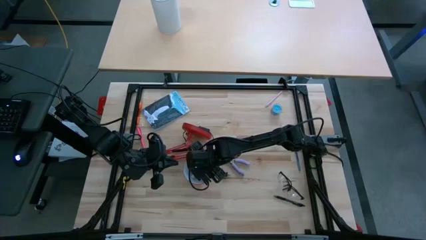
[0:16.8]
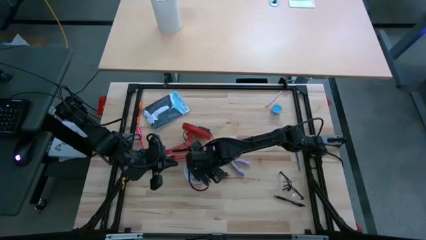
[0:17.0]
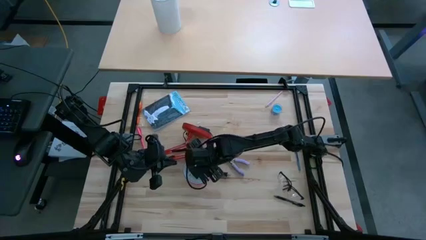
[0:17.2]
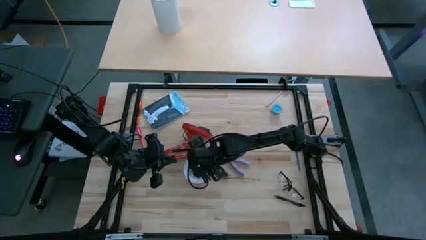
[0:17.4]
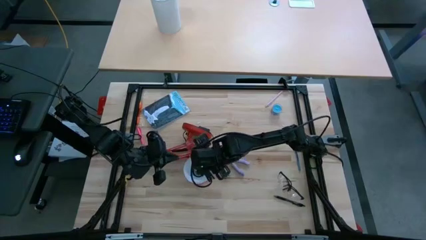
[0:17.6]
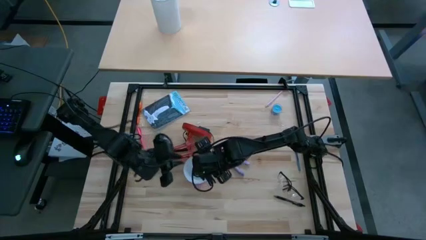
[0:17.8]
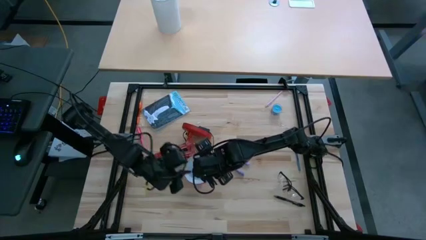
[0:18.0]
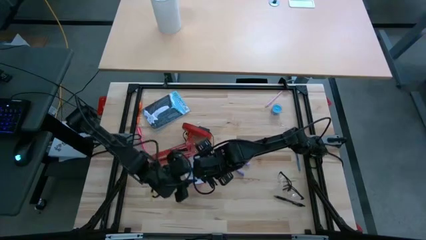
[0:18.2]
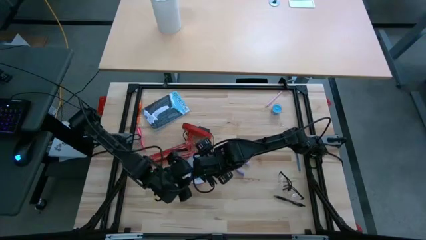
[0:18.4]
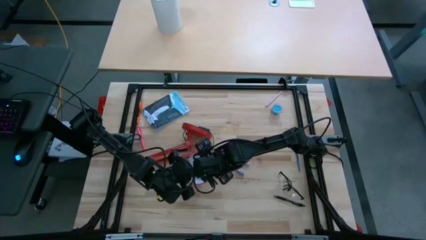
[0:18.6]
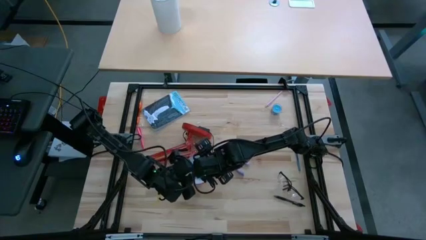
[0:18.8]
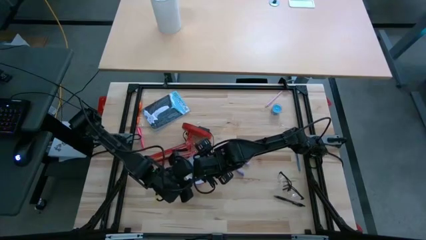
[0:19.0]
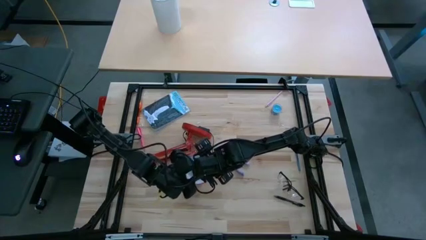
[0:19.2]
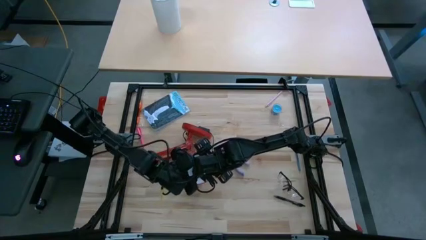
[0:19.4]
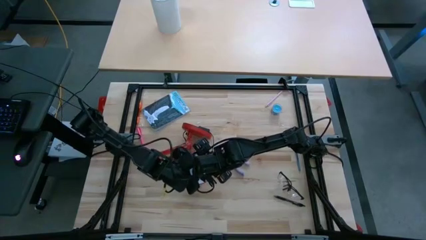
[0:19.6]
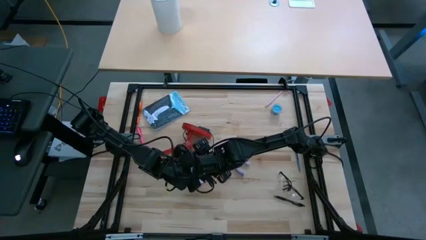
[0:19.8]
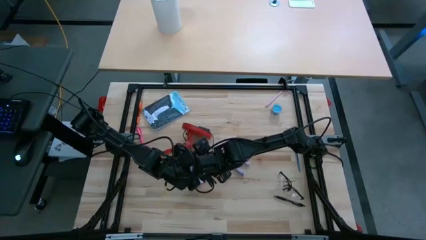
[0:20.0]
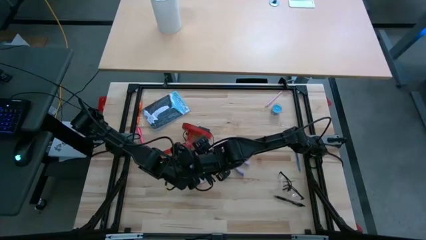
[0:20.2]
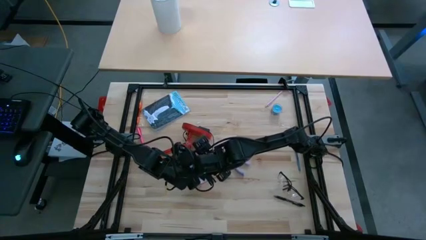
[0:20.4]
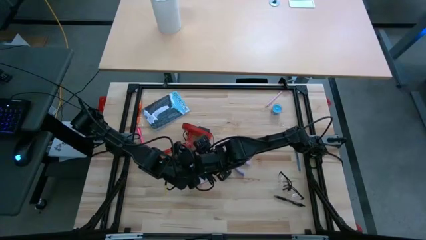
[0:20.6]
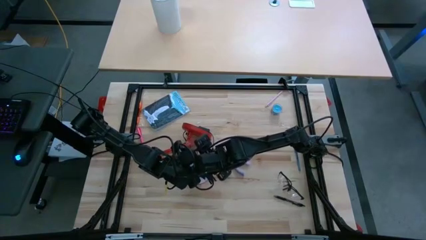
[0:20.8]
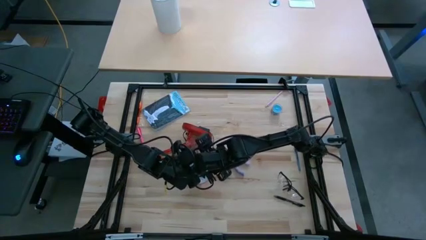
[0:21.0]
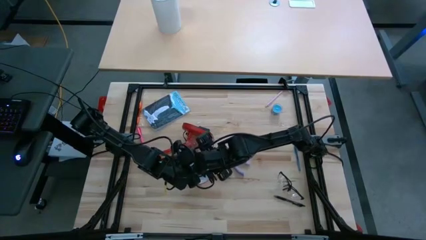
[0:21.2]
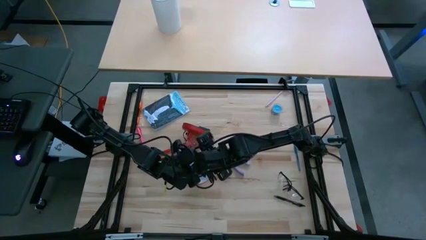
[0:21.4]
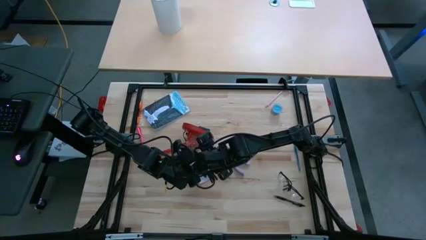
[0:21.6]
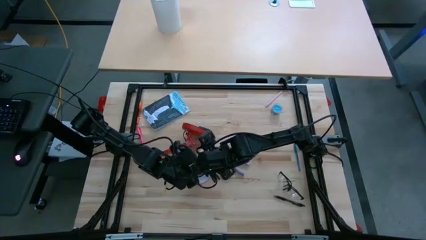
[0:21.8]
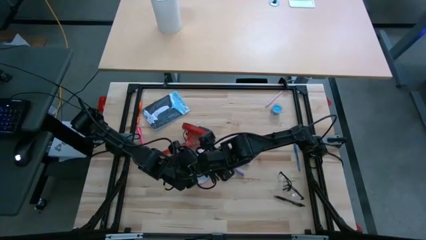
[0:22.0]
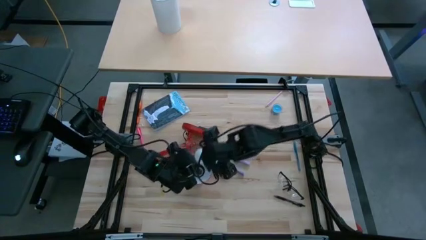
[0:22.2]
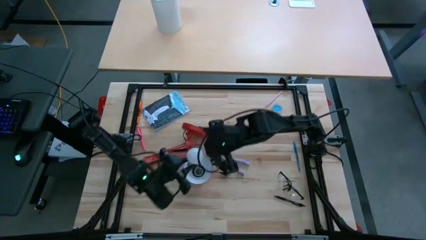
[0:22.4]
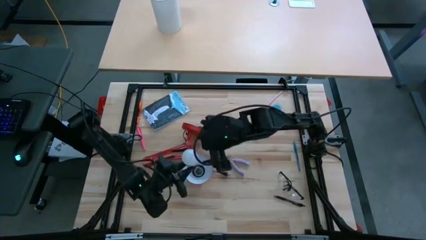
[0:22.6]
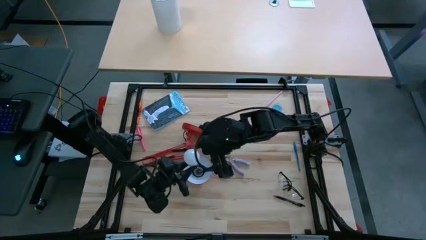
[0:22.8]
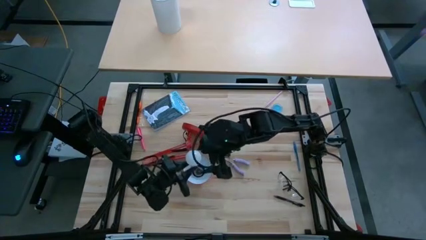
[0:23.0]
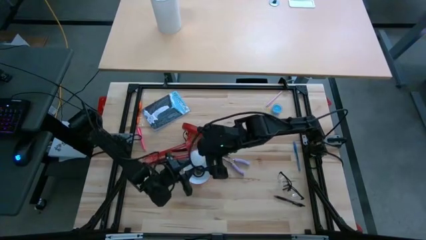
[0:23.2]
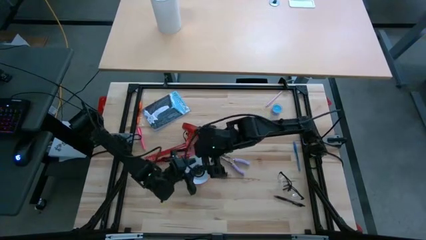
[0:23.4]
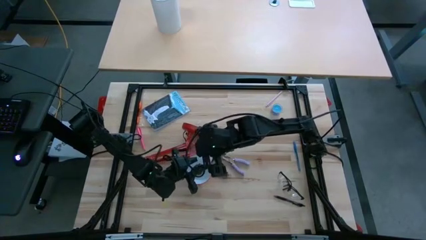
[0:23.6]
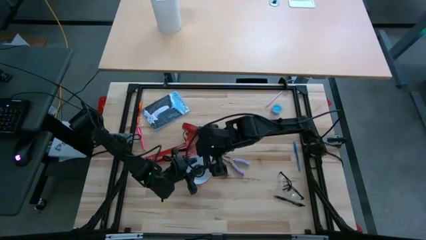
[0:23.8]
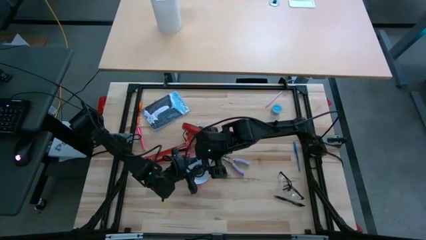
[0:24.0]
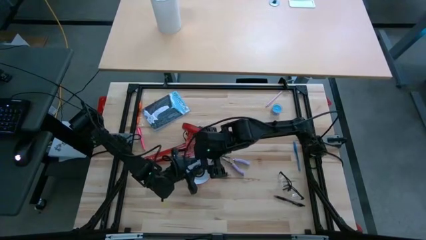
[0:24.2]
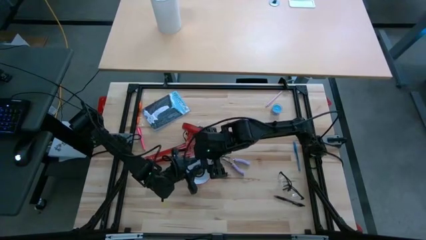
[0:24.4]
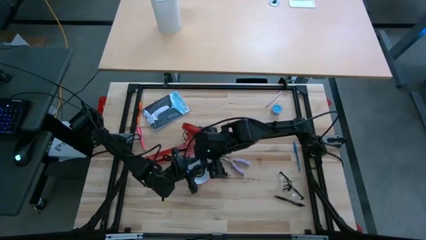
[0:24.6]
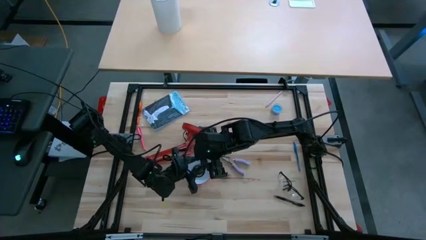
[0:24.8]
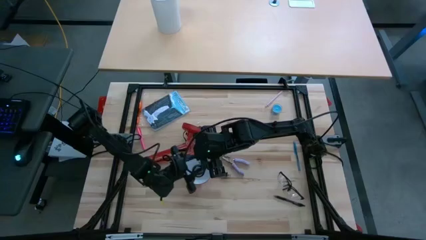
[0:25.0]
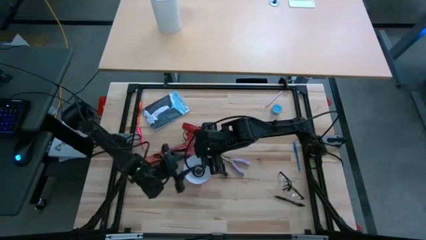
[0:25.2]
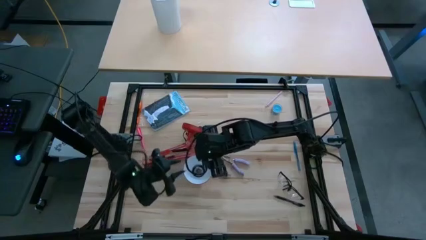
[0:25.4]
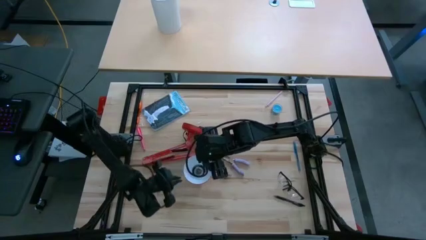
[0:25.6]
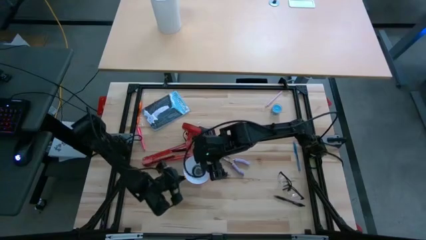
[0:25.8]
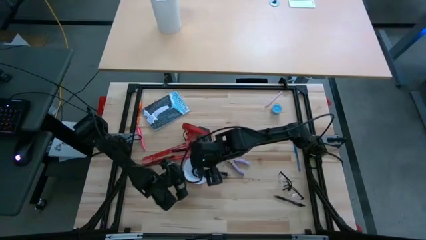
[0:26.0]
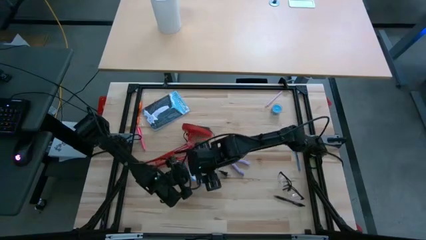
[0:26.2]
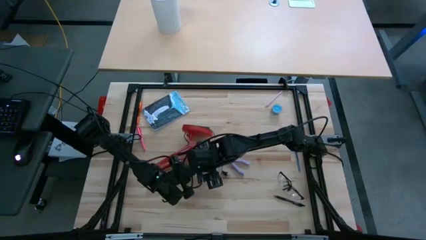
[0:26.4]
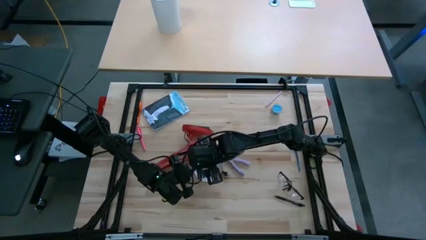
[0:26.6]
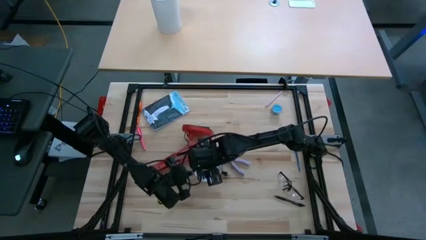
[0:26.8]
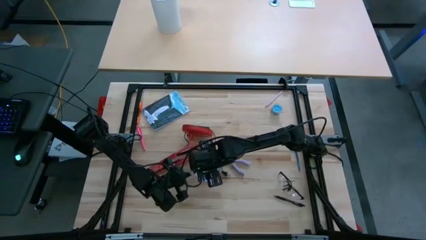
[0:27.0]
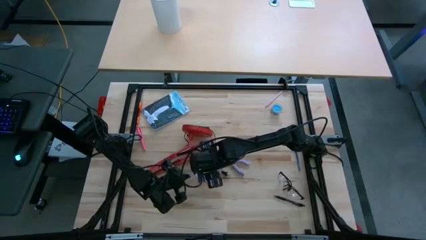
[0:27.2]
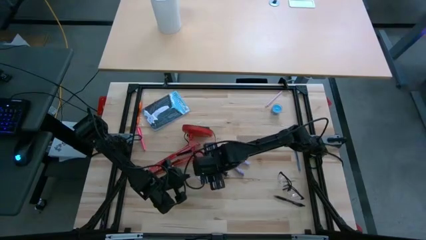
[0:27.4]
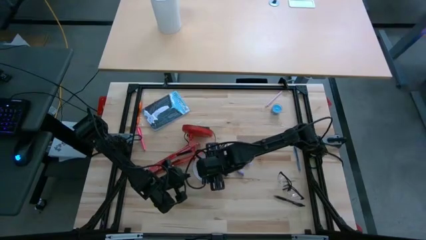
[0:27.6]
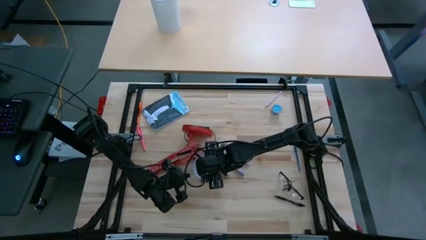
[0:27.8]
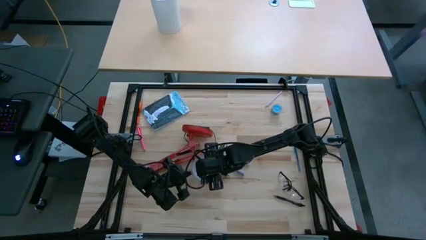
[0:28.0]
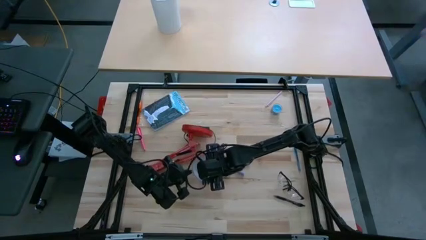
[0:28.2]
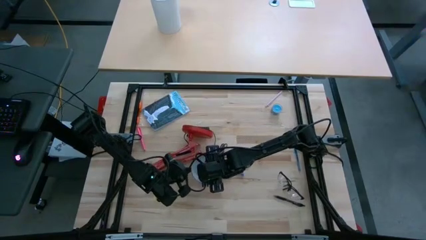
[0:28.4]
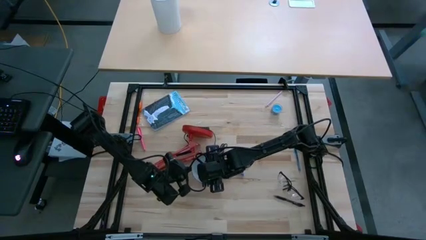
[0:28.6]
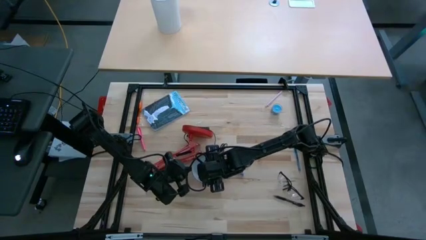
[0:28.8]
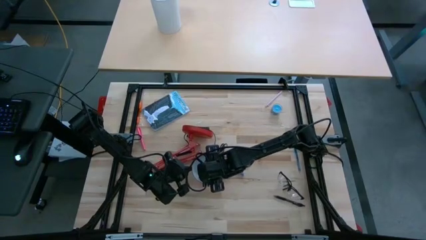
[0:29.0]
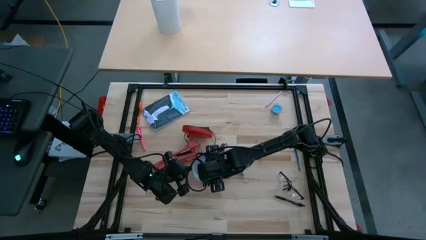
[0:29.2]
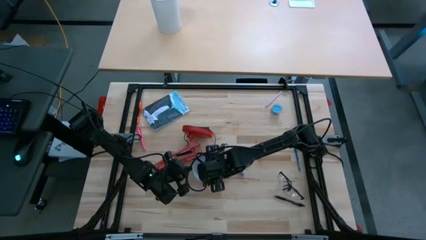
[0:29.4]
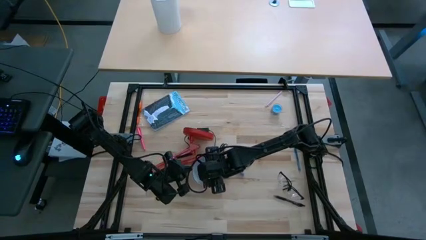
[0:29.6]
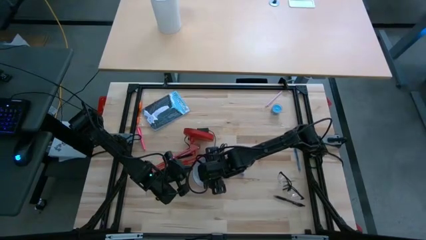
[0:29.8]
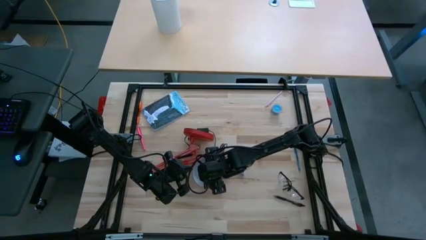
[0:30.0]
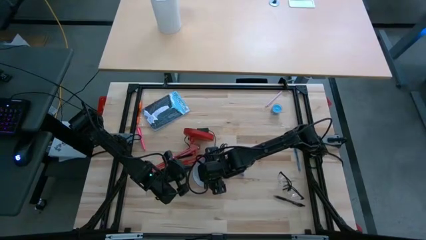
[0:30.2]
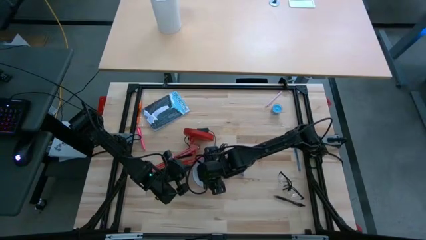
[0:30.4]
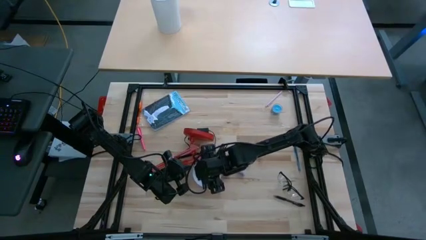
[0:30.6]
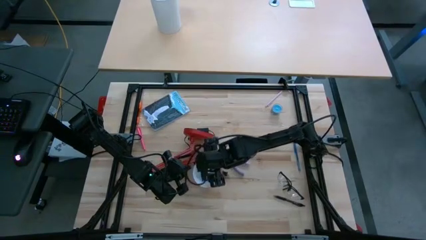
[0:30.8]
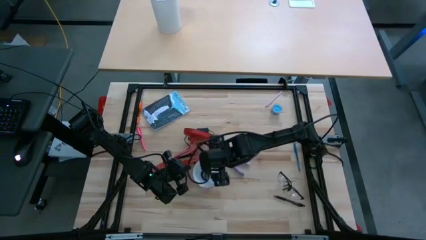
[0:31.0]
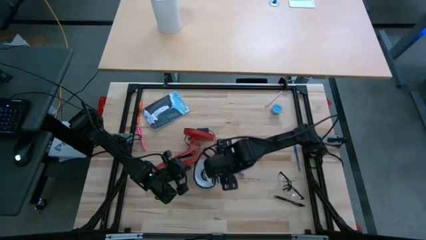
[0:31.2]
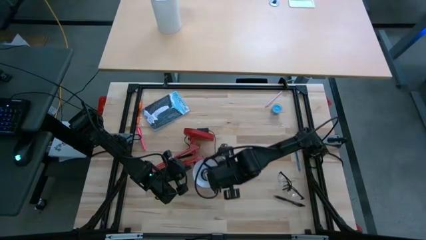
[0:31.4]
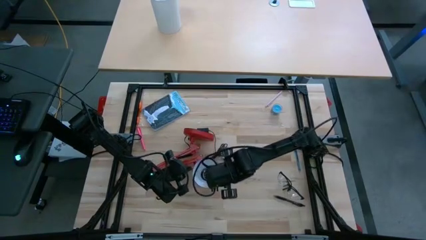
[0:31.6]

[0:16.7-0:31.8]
Task: Screw lightbulb
Insert the lightbulb into the red desk lamp
